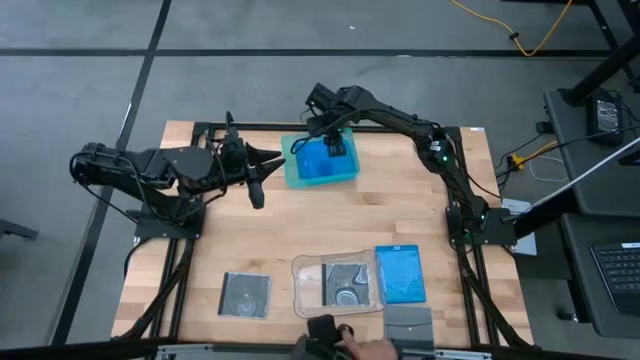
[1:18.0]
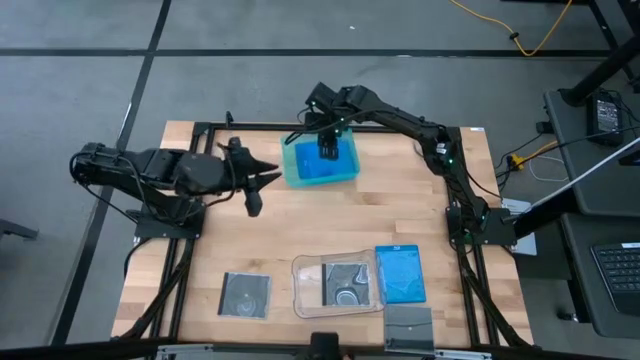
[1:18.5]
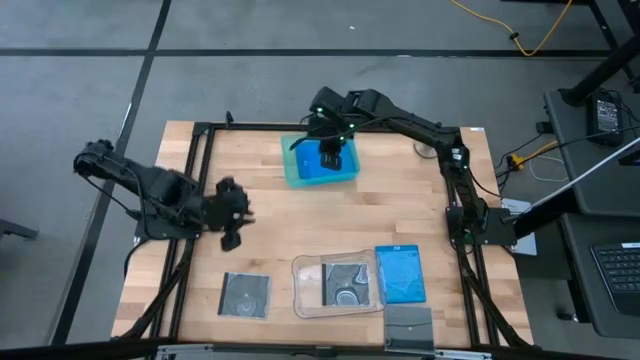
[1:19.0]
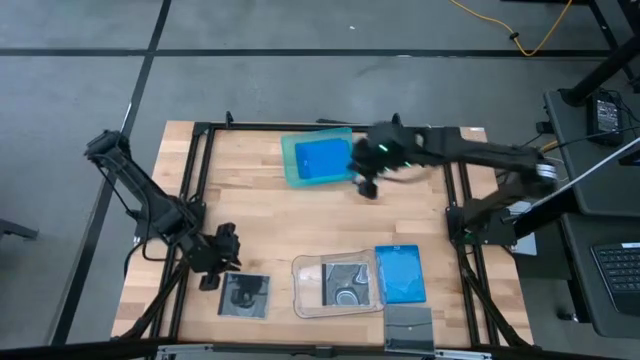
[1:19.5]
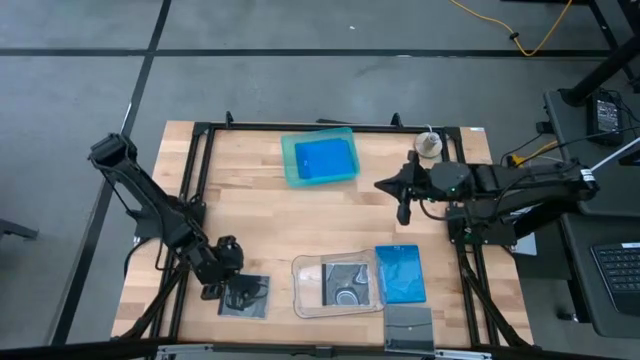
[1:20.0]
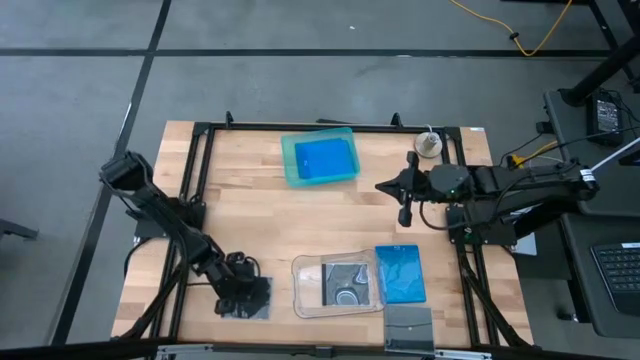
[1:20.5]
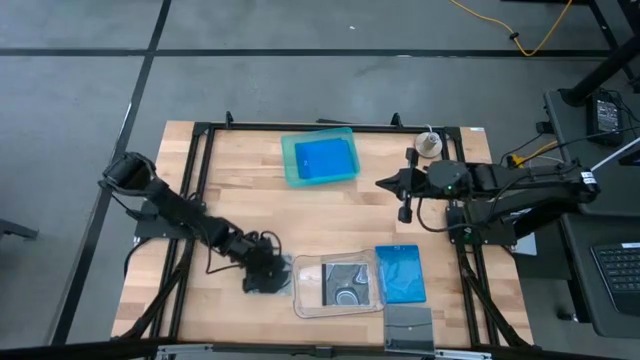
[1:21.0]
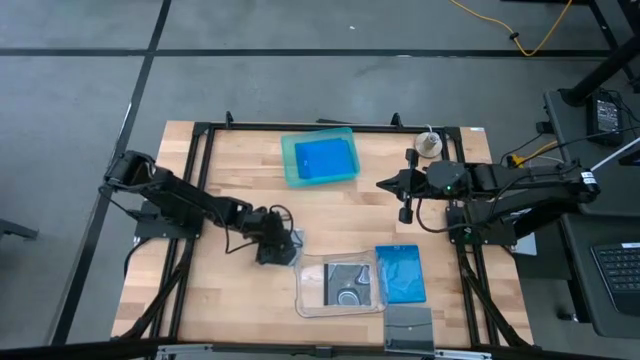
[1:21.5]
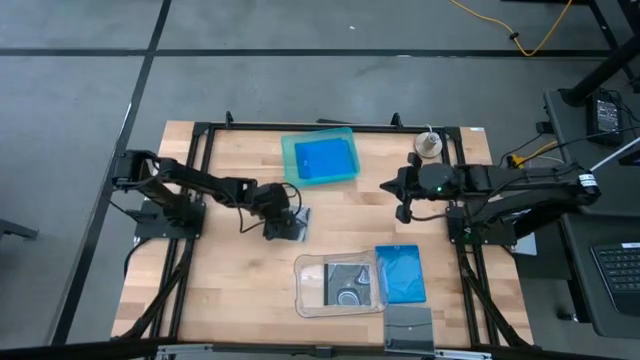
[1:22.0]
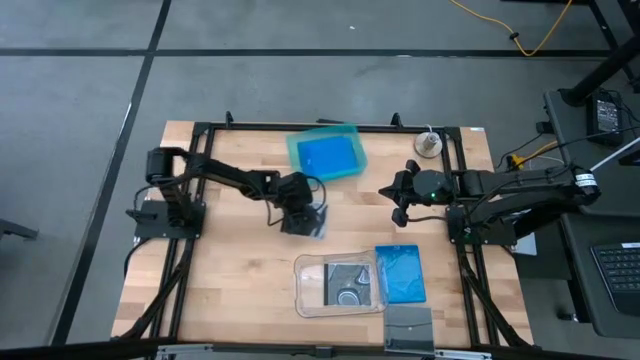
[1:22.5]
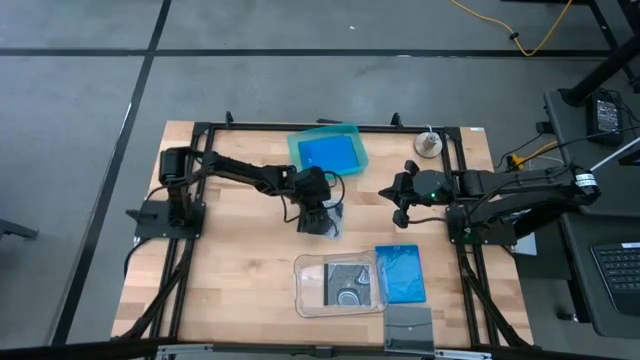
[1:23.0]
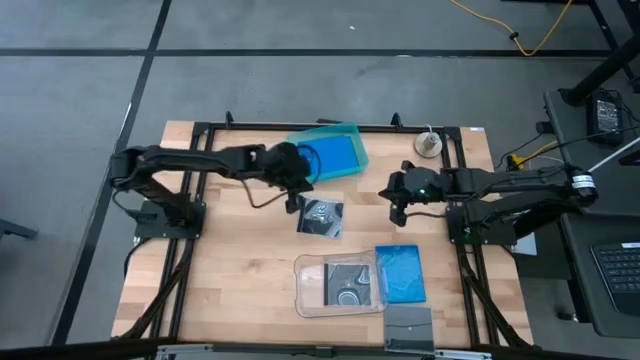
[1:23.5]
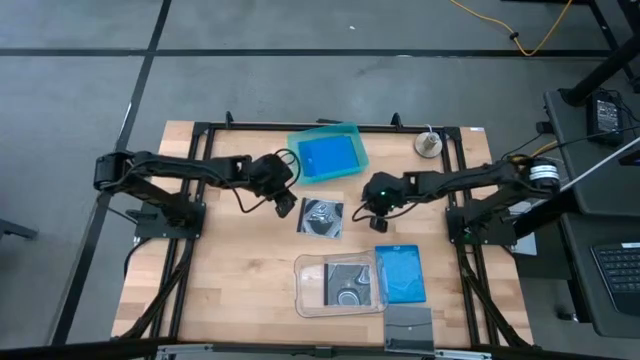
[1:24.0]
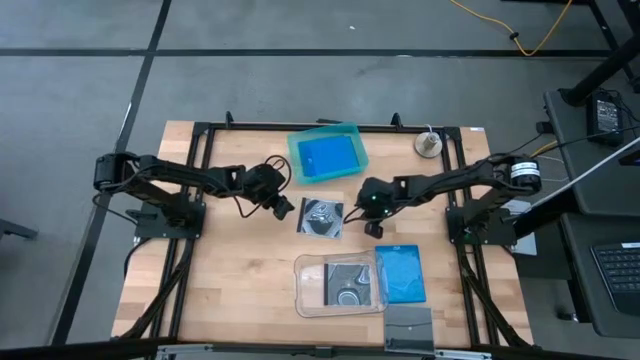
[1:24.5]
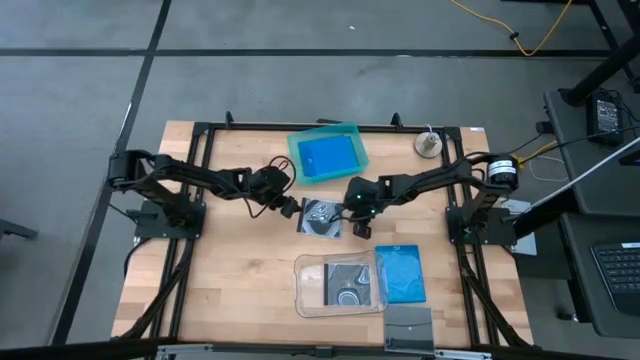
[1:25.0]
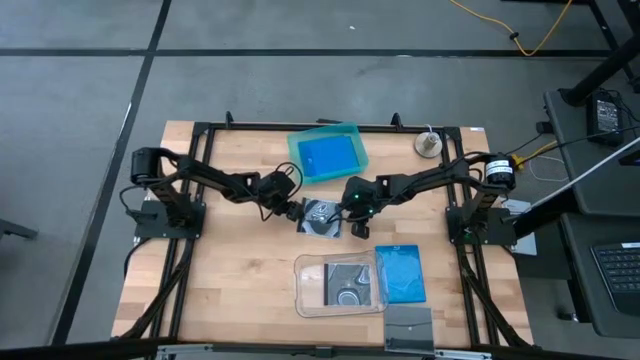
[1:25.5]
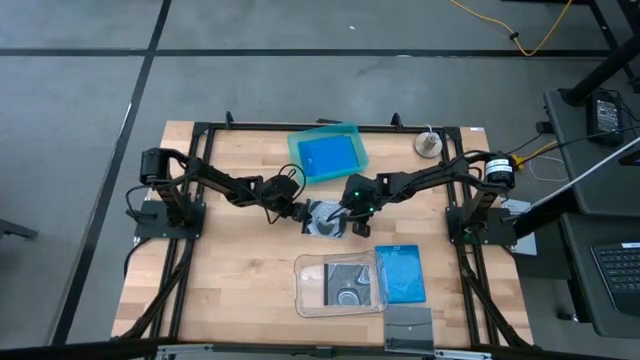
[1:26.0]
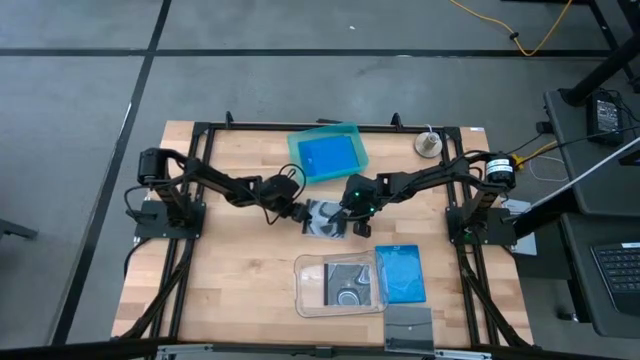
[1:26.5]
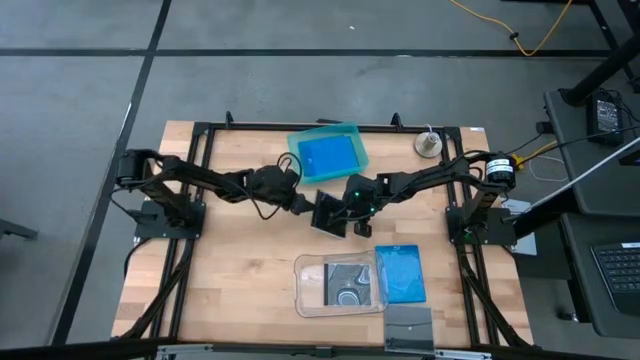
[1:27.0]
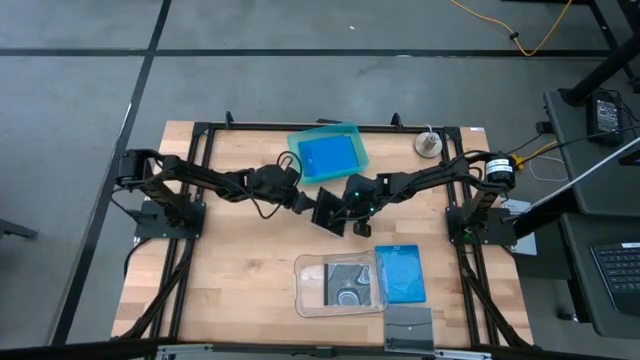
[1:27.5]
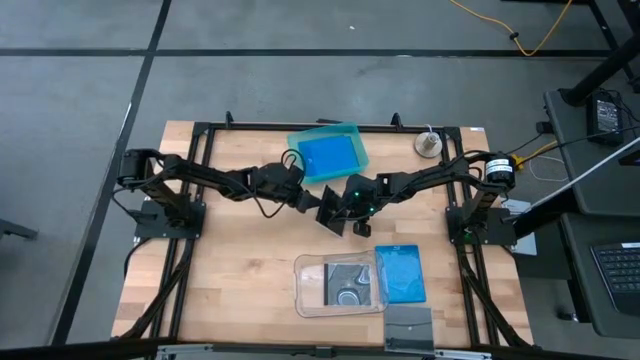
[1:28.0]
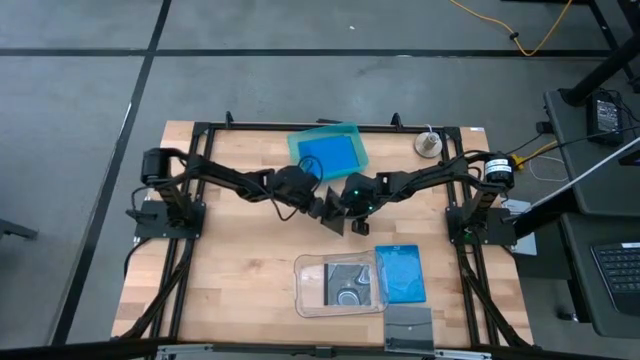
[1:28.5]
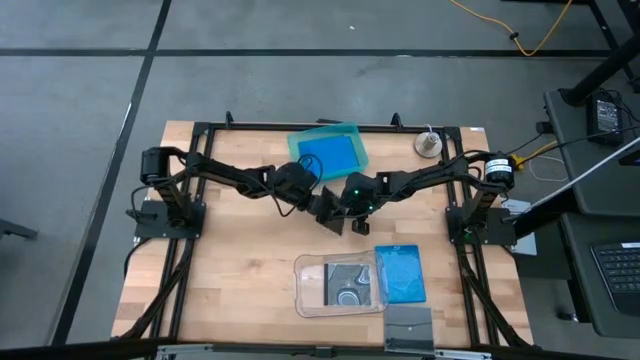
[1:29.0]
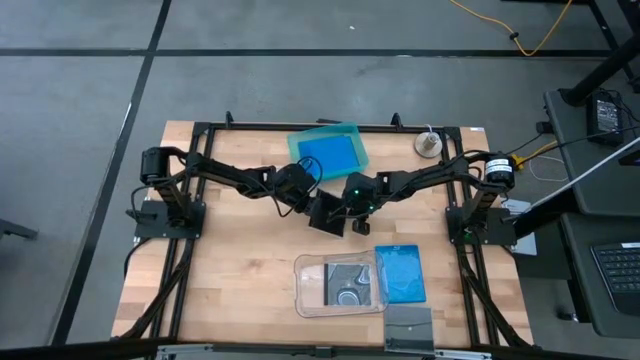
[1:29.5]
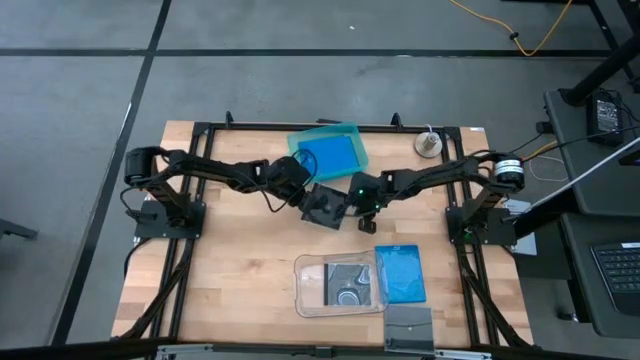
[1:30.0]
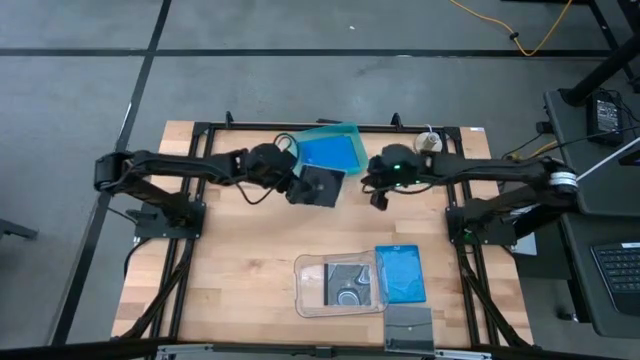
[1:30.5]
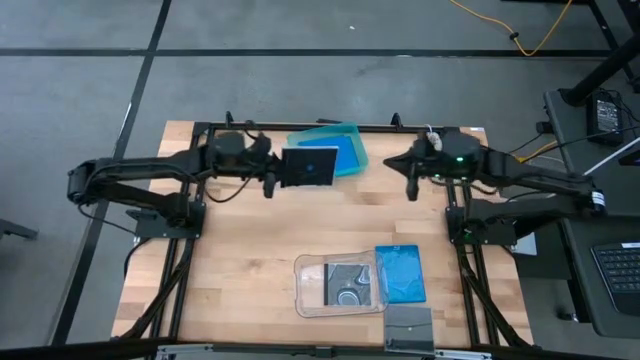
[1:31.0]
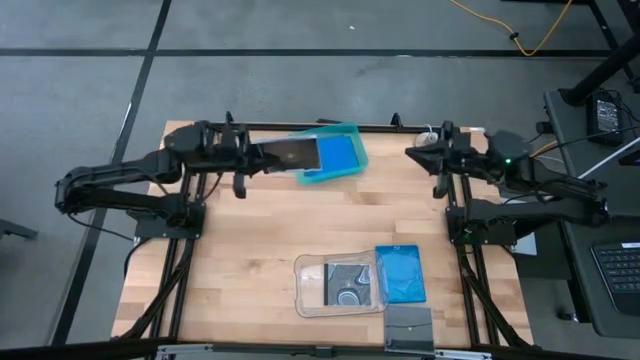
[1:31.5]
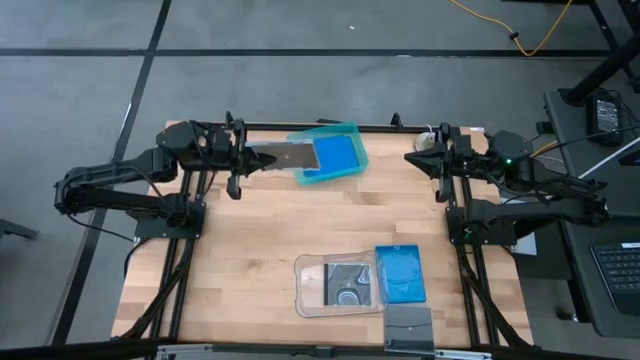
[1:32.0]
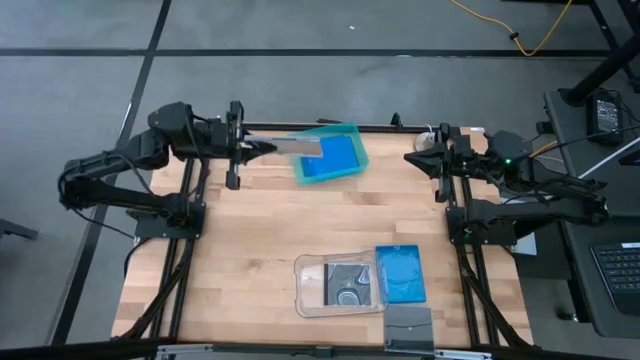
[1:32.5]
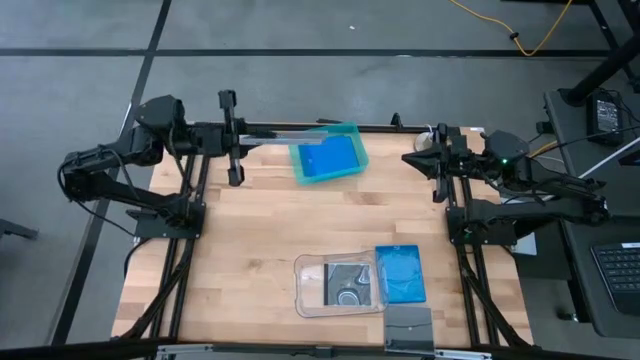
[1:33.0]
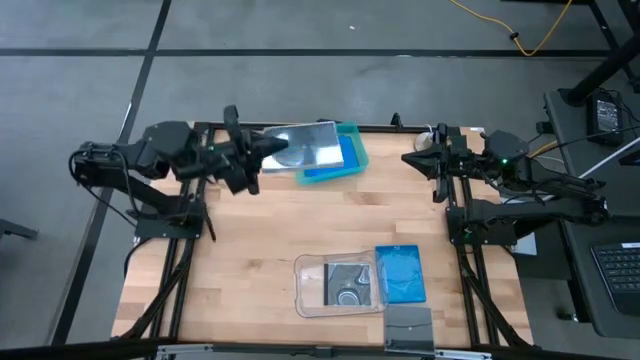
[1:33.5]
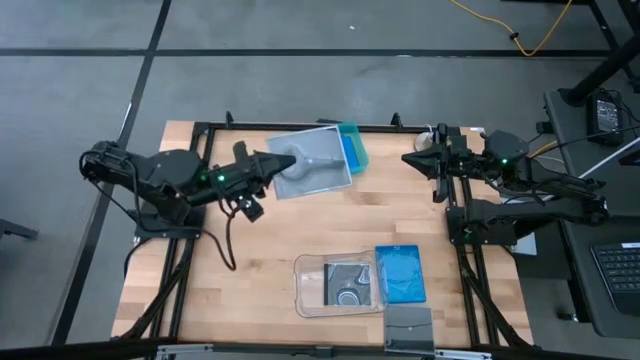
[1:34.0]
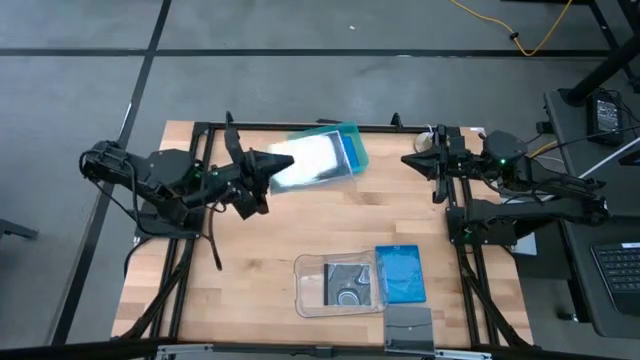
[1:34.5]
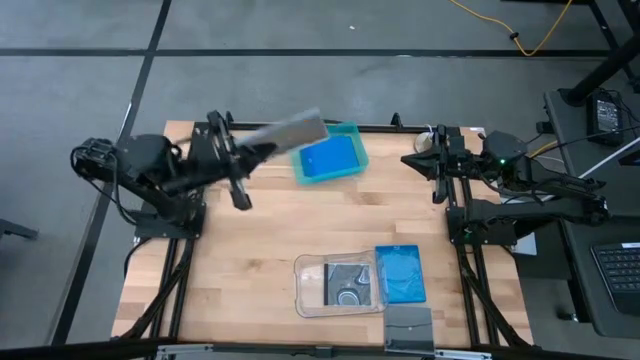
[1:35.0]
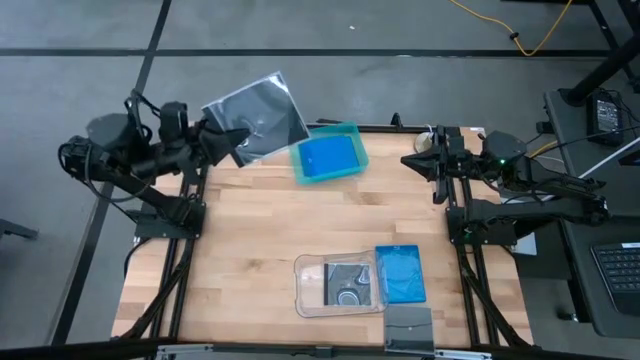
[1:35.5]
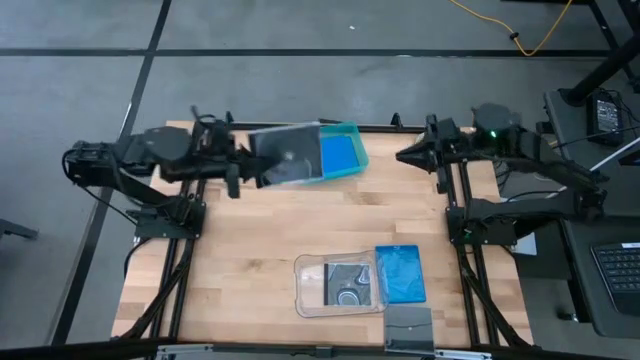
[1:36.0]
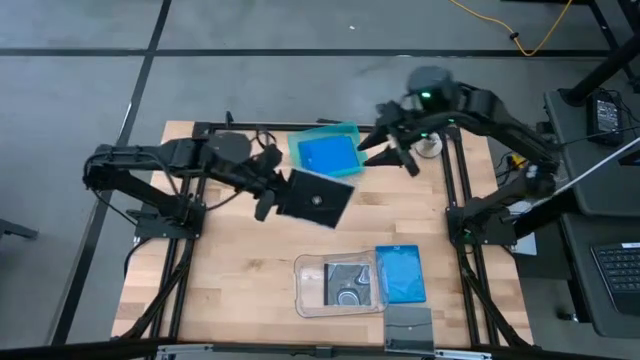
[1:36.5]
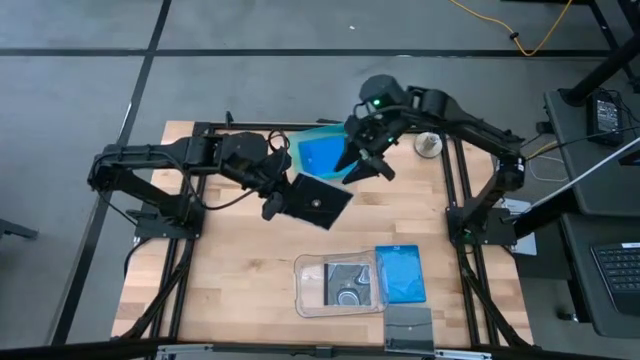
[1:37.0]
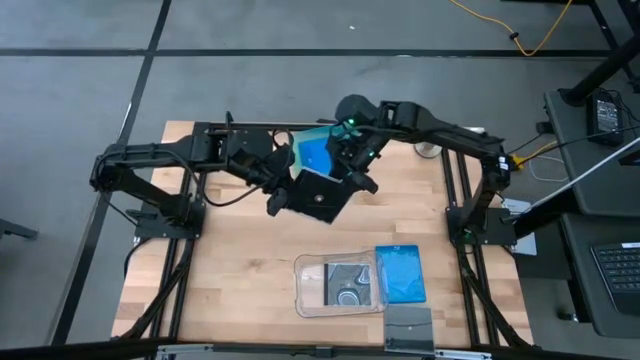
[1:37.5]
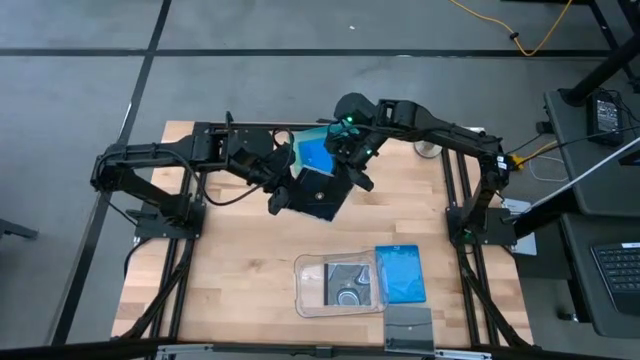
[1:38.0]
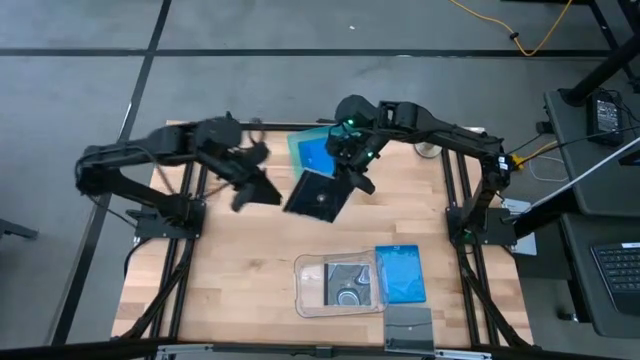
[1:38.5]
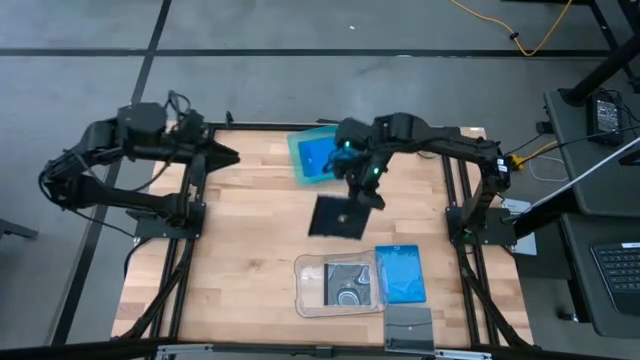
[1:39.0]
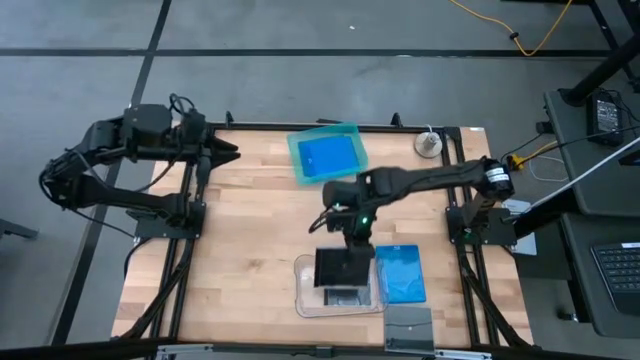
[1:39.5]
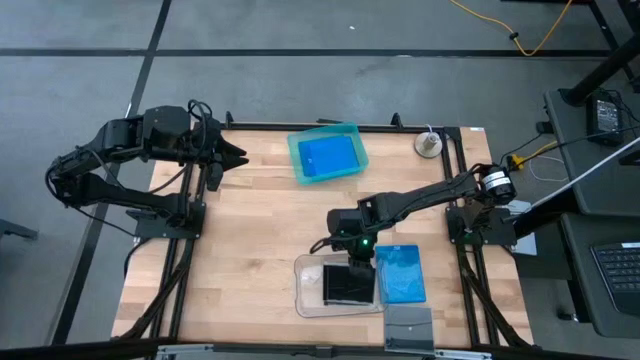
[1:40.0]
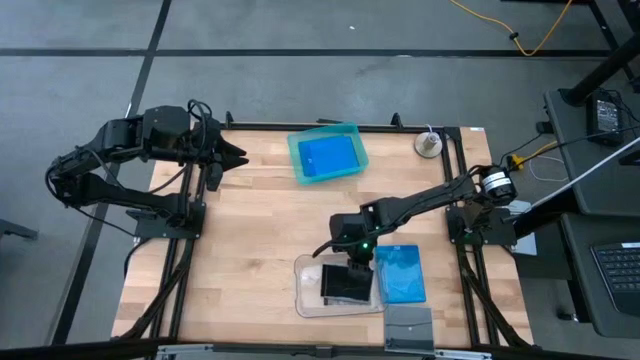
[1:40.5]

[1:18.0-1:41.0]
Task: Pick & place jewel cases by type
Put the top black CD case into the transparent bin
